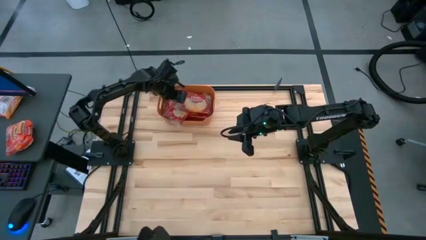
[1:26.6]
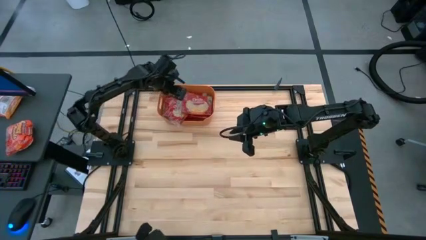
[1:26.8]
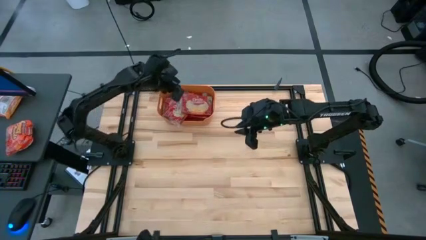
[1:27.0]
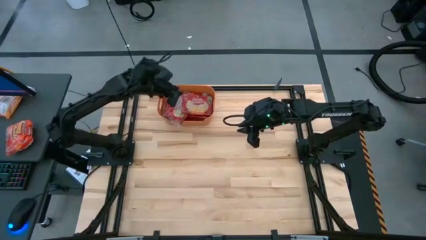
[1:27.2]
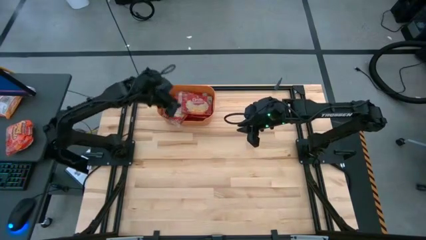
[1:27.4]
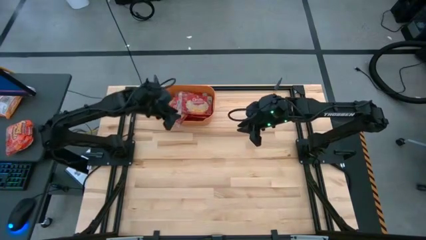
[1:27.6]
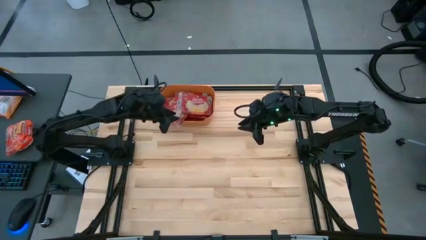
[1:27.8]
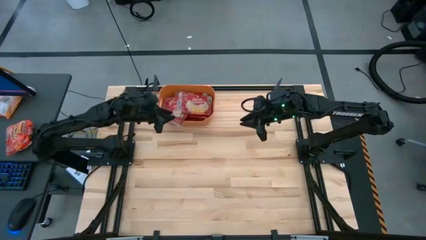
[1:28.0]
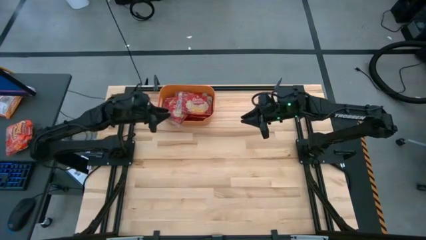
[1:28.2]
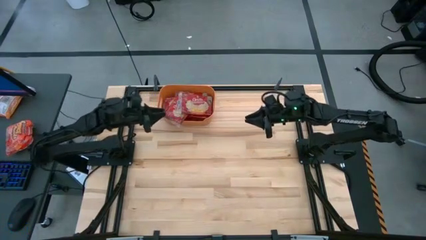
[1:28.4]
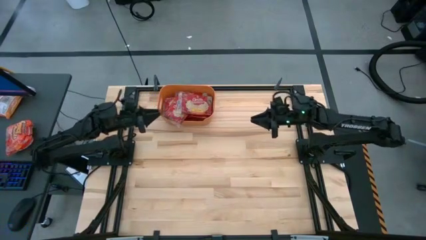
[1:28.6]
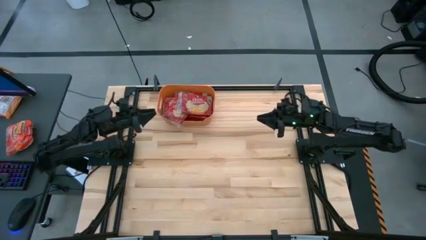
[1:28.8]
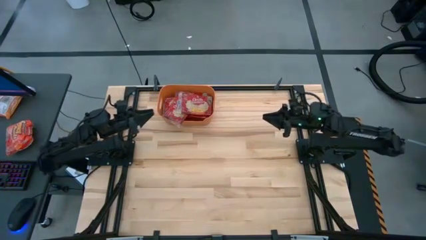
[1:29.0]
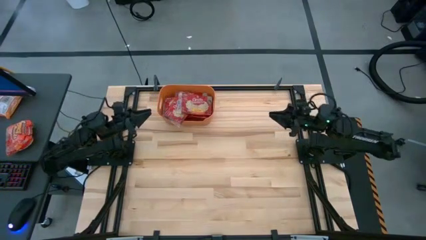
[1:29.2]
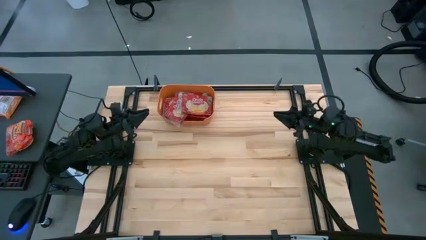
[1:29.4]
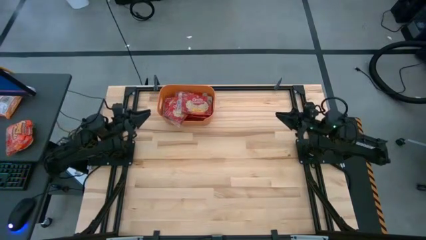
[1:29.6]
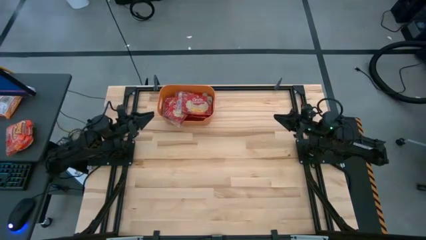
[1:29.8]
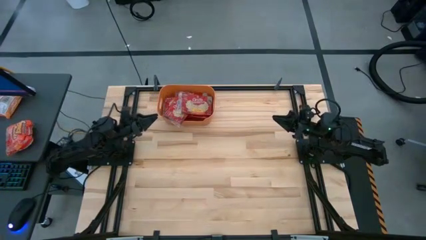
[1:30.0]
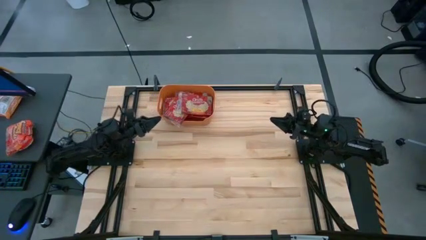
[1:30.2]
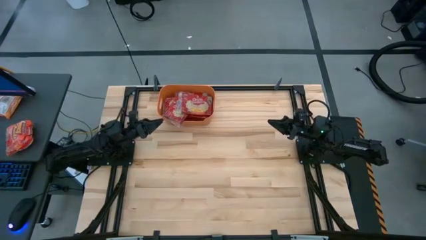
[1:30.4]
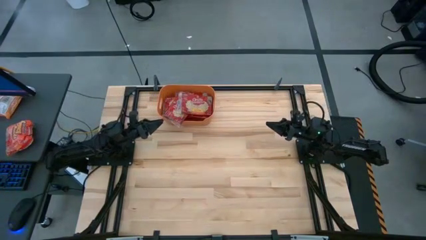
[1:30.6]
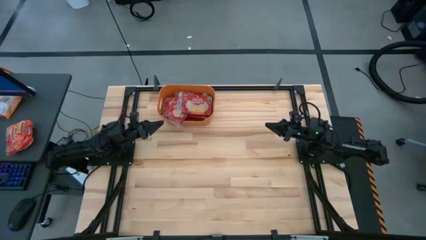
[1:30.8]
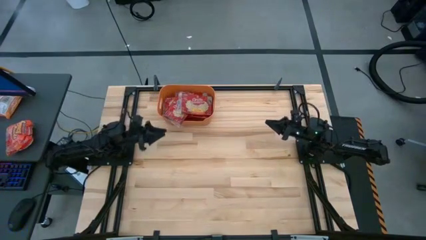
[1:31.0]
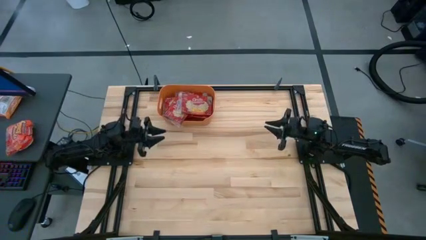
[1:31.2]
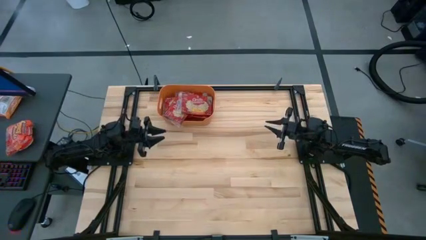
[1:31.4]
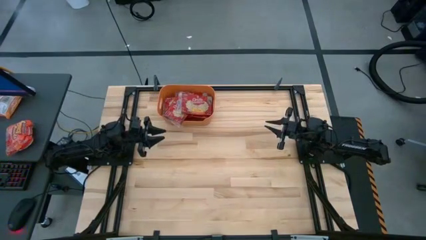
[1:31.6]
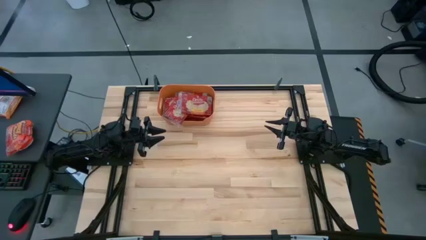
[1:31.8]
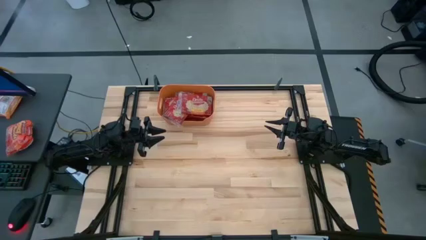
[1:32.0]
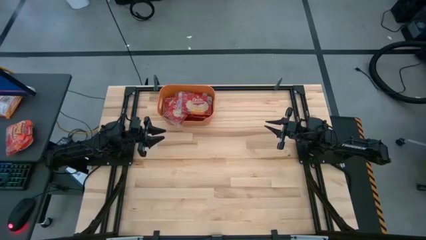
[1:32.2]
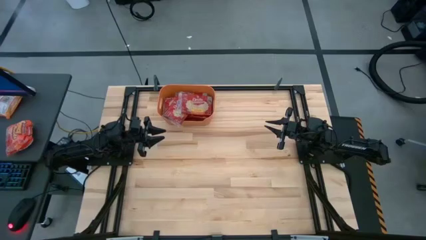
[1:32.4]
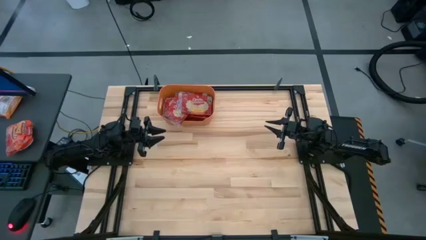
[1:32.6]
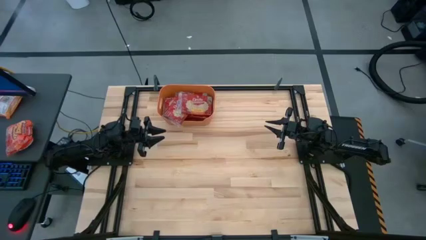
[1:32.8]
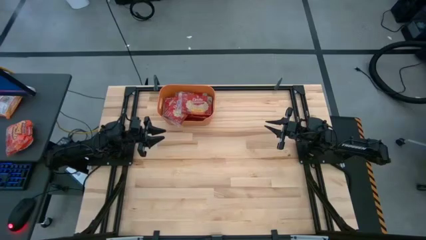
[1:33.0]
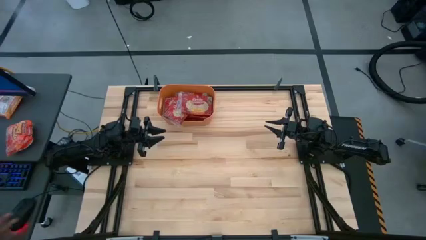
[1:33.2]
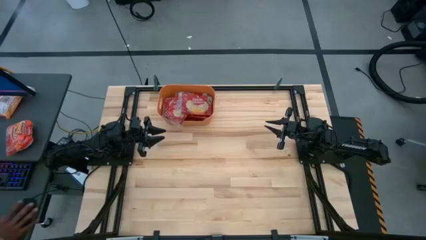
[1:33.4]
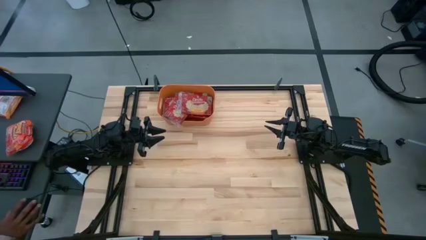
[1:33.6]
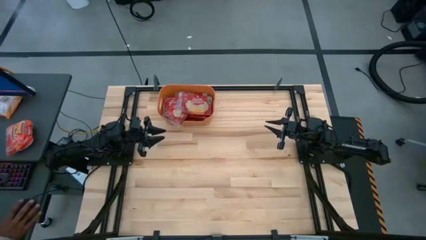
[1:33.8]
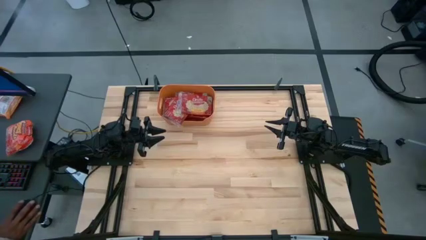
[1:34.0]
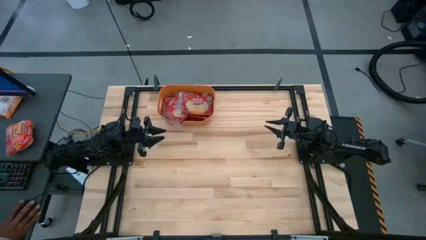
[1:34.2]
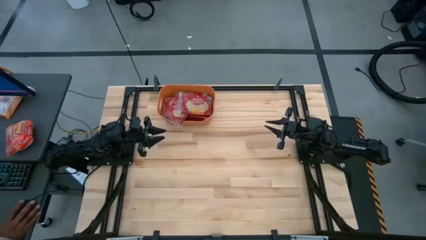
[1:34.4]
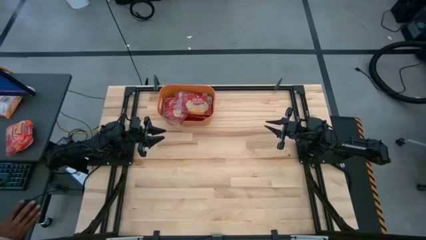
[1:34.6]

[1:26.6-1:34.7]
Task: Sort popcorn bags into baskets
Return to Home Position

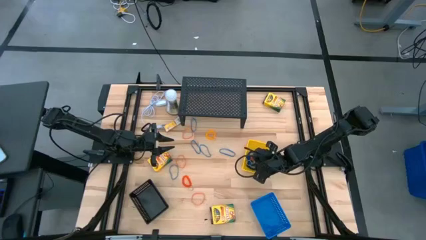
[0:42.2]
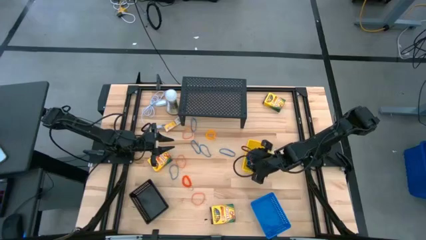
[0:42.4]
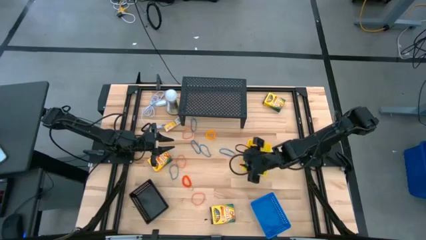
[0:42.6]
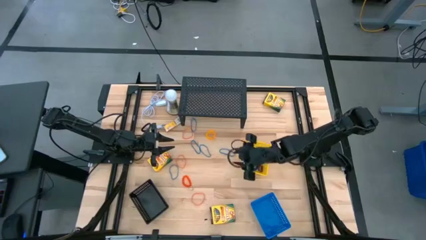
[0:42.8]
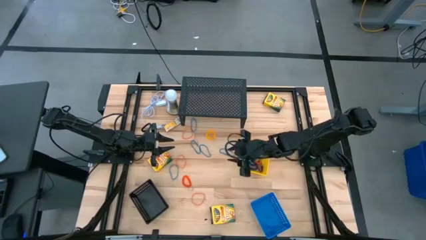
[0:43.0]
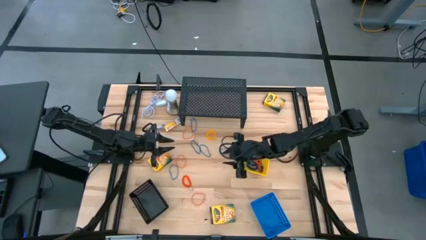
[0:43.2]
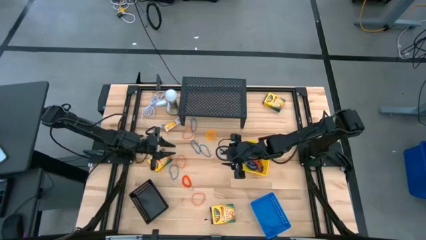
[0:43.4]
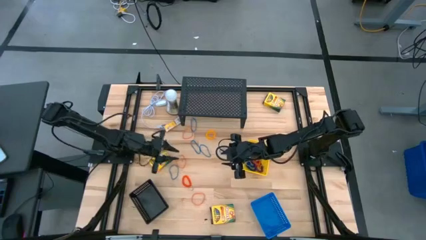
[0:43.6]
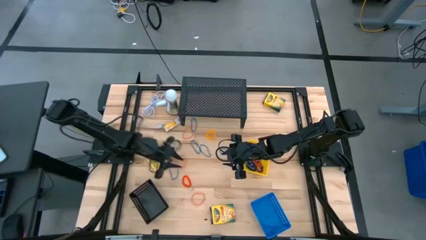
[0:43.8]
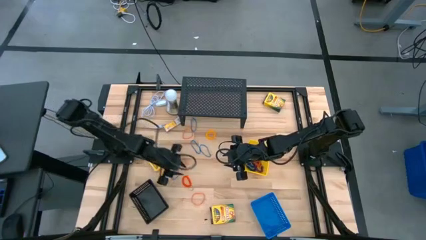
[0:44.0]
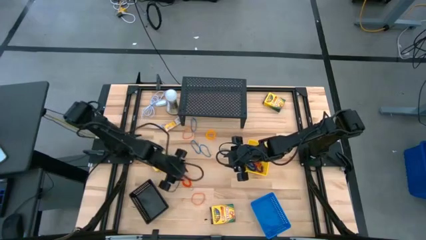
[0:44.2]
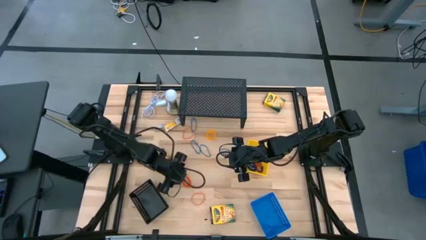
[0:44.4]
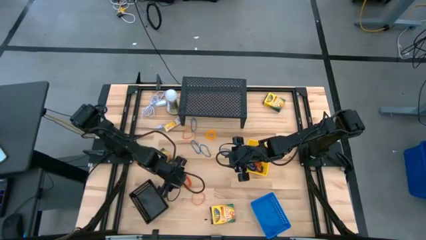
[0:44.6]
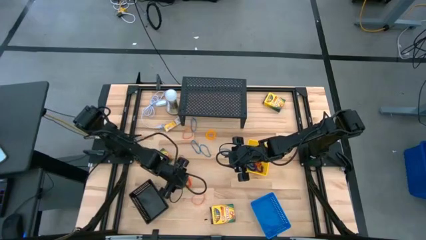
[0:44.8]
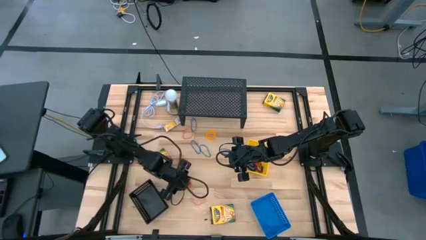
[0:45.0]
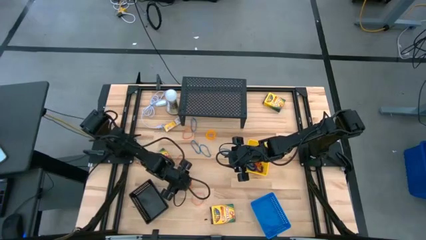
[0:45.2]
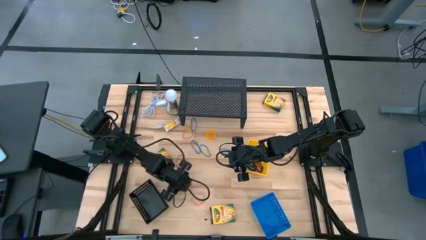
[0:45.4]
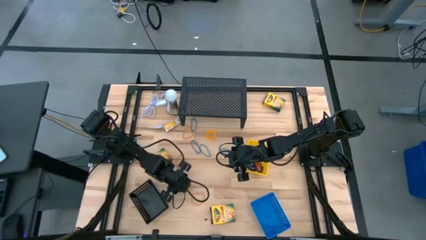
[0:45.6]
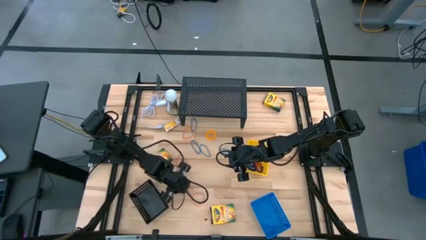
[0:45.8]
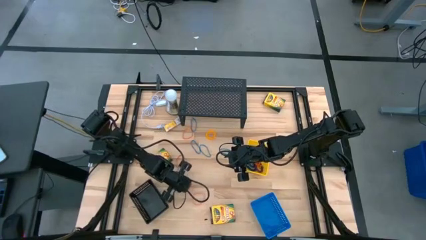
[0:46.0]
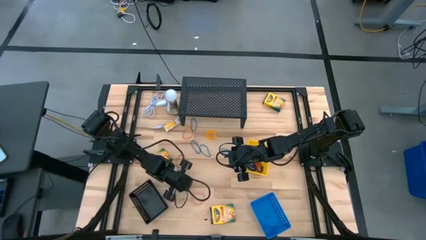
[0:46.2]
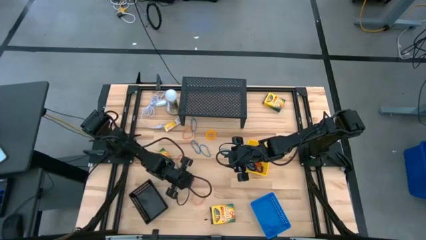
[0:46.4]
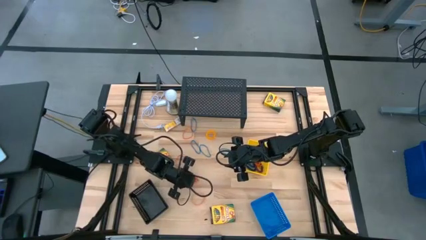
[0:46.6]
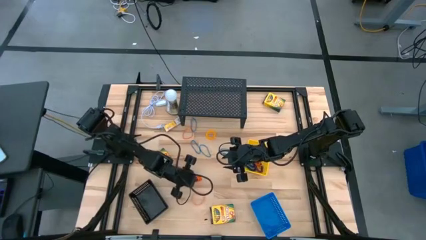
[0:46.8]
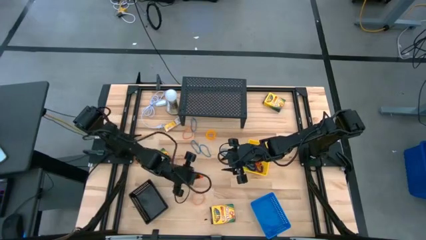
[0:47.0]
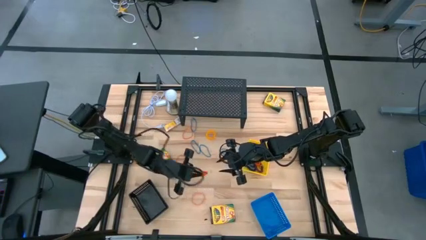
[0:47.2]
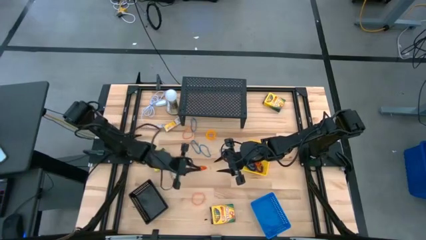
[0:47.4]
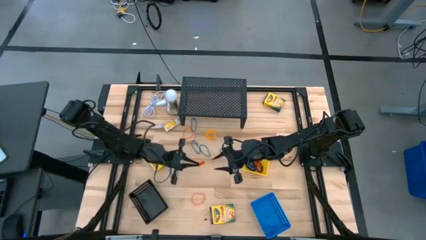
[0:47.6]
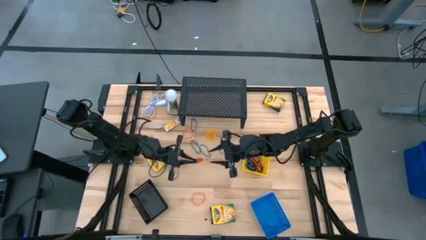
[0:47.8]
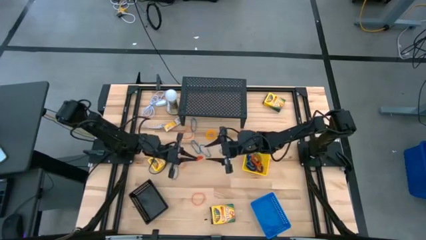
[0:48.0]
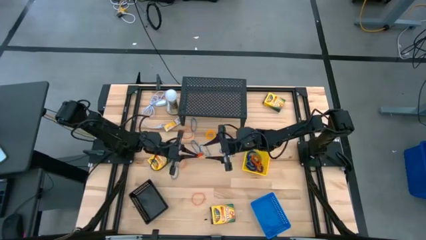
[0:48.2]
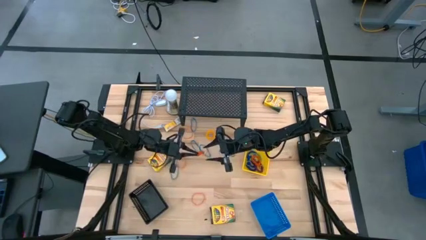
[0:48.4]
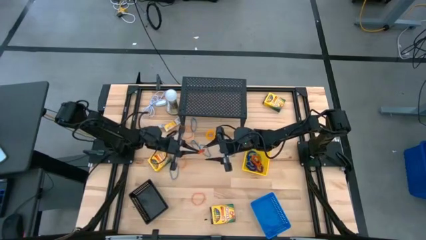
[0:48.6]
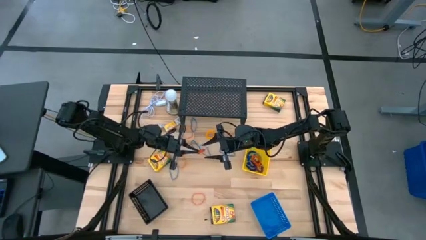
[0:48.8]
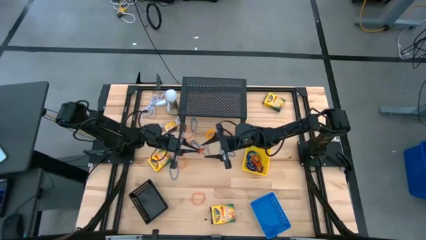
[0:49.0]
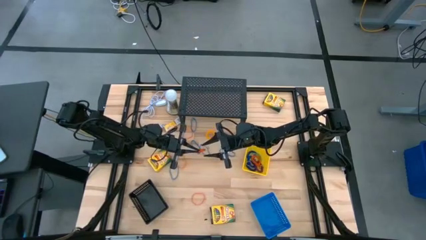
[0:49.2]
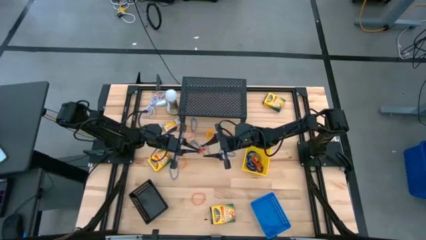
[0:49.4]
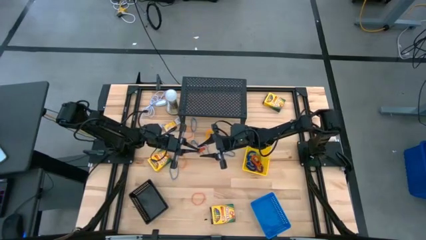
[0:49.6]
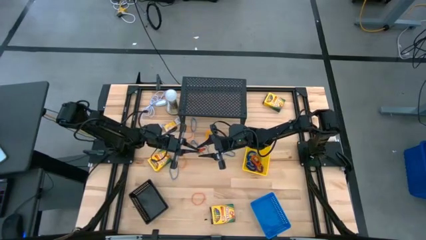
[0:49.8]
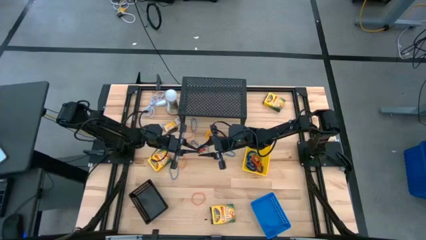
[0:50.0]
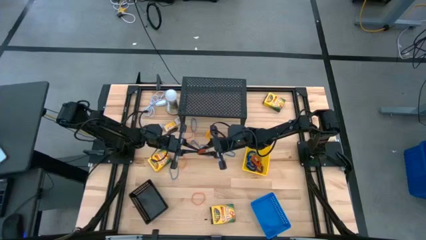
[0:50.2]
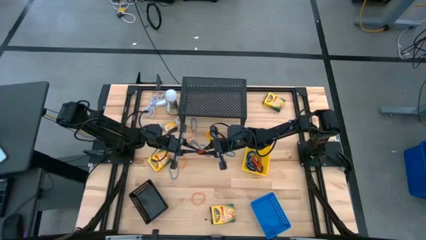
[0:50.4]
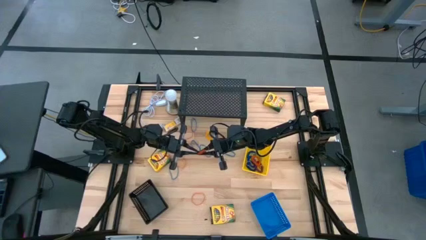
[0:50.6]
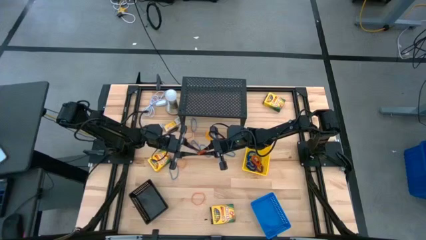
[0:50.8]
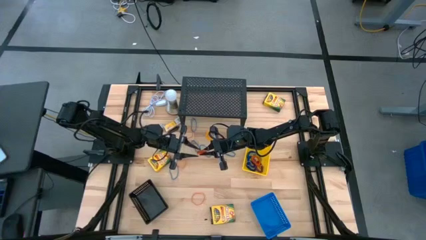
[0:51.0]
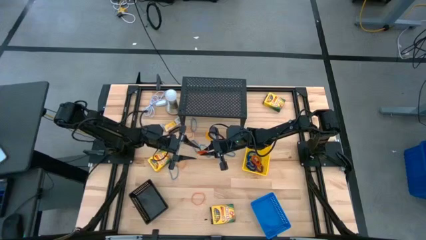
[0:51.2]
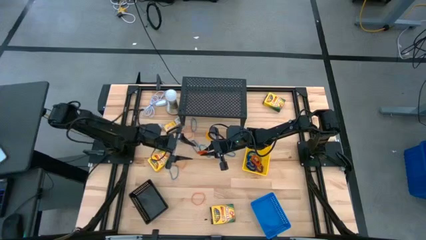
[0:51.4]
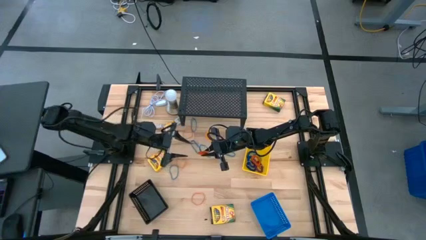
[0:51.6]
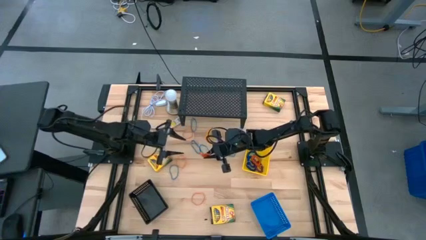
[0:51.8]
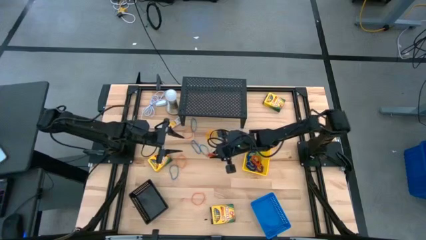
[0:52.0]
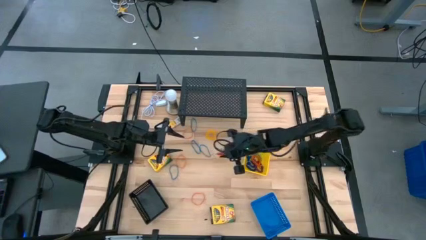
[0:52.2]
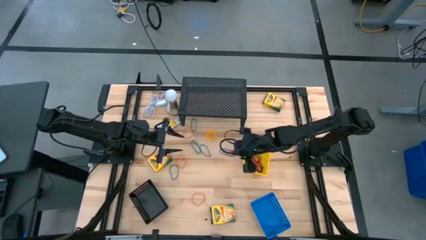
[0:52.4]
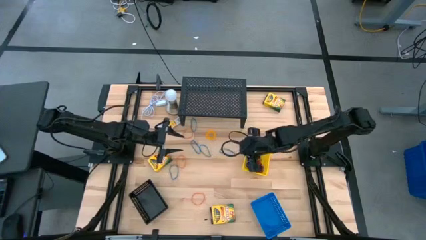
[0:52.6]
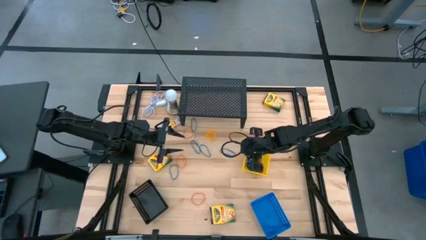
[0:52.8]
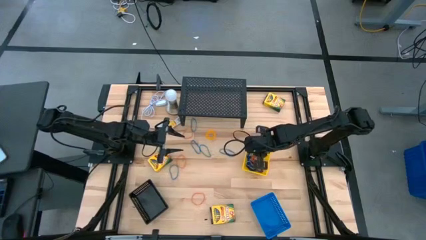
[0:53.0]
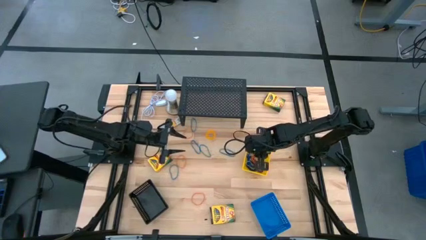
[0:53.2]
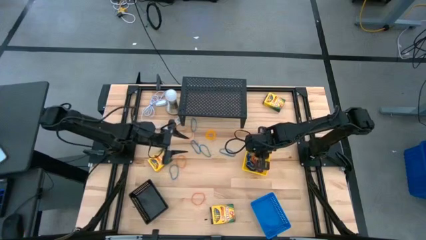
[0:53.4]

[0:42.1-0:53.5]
Task: Pick & Place Office Desk Supplies
Put the orange spring keychain into the yellow basket
